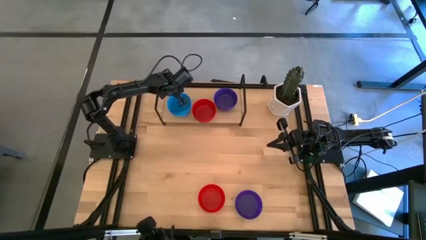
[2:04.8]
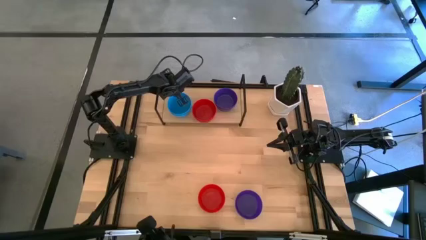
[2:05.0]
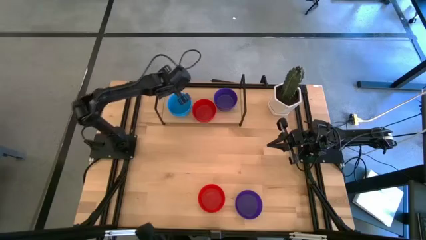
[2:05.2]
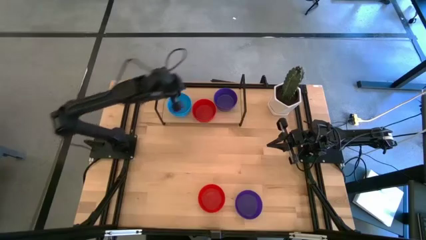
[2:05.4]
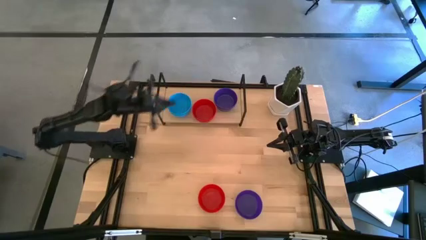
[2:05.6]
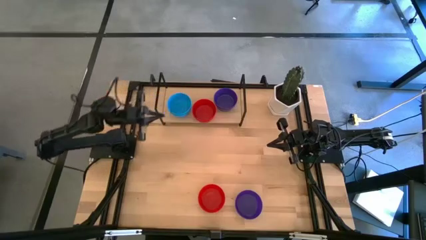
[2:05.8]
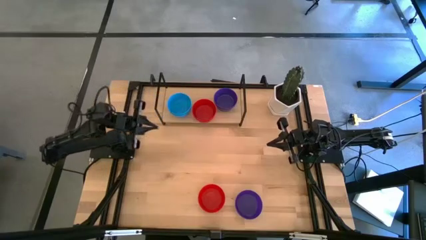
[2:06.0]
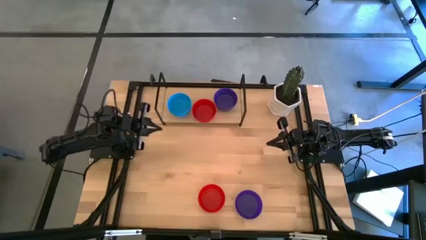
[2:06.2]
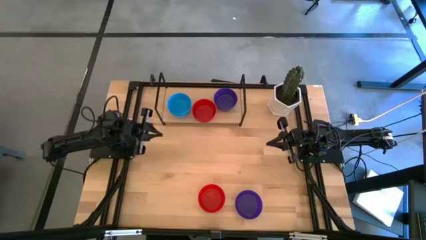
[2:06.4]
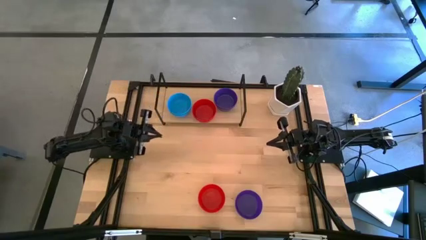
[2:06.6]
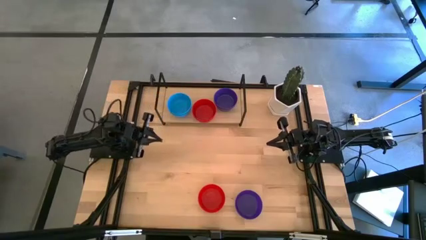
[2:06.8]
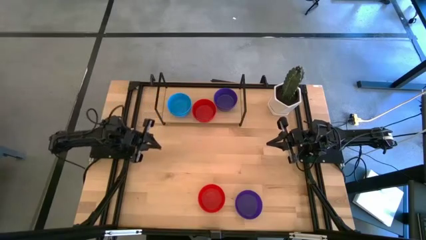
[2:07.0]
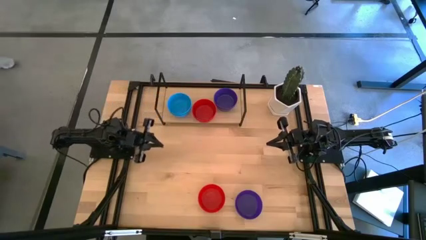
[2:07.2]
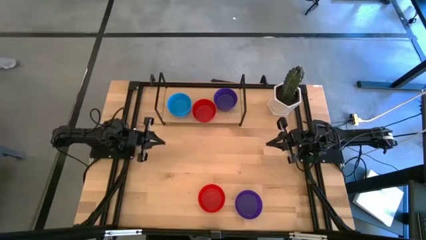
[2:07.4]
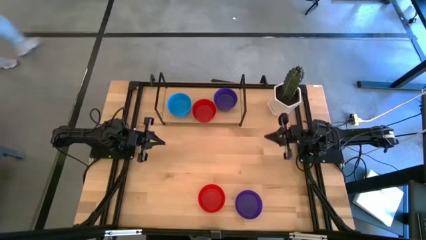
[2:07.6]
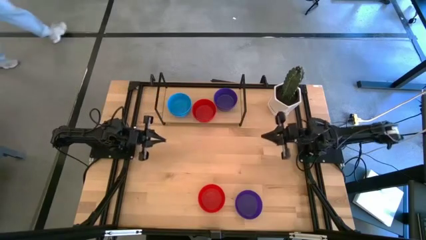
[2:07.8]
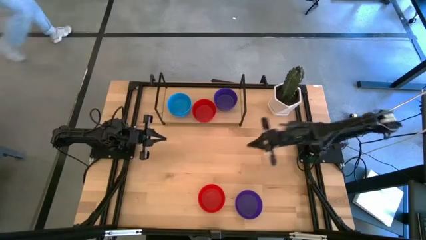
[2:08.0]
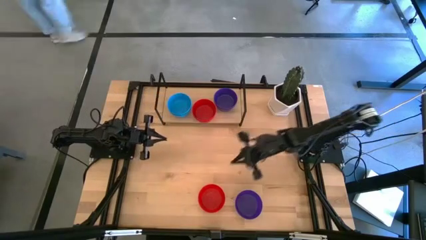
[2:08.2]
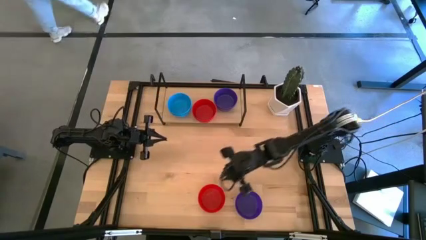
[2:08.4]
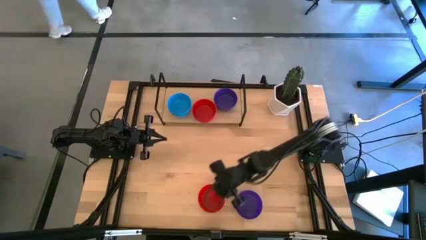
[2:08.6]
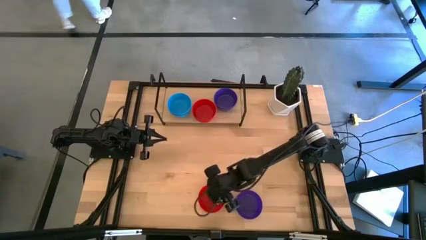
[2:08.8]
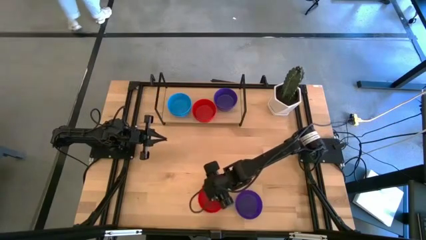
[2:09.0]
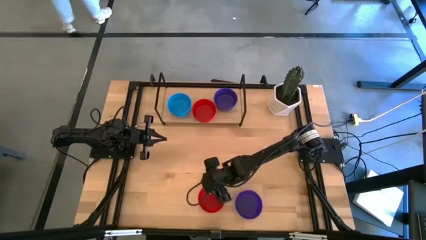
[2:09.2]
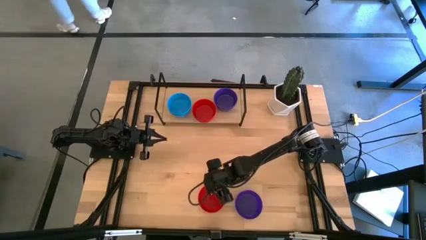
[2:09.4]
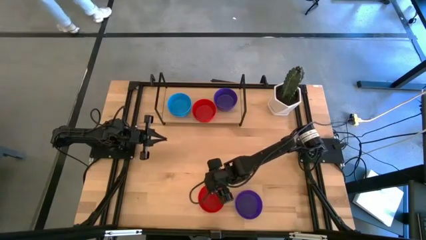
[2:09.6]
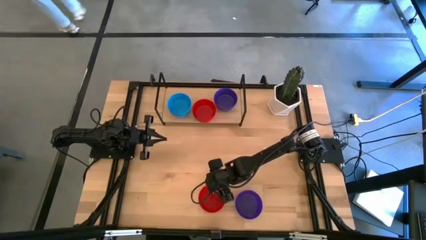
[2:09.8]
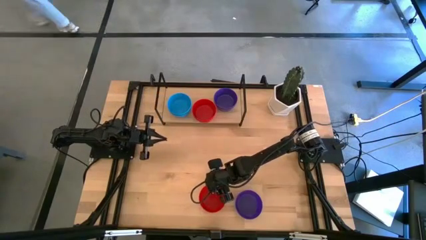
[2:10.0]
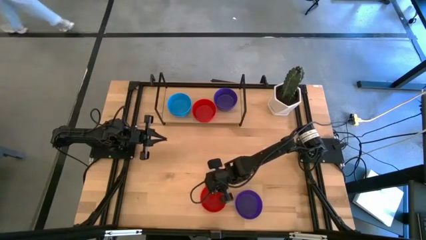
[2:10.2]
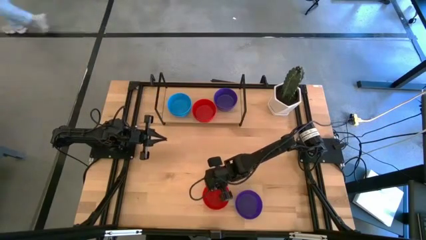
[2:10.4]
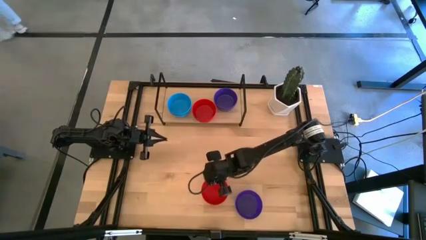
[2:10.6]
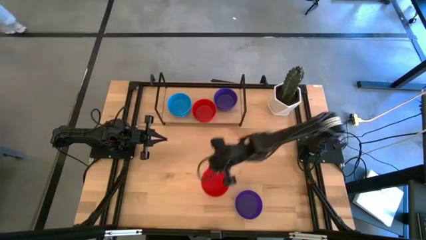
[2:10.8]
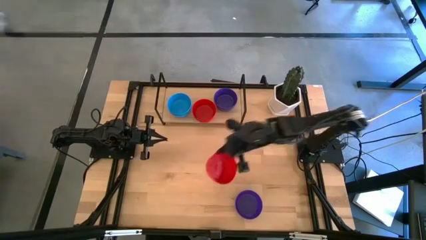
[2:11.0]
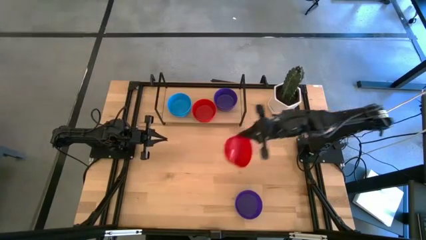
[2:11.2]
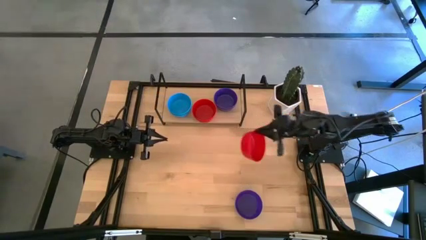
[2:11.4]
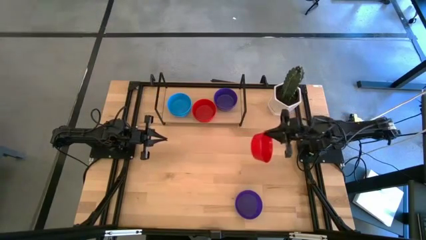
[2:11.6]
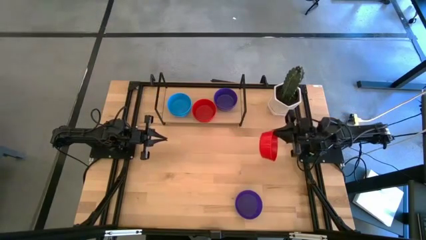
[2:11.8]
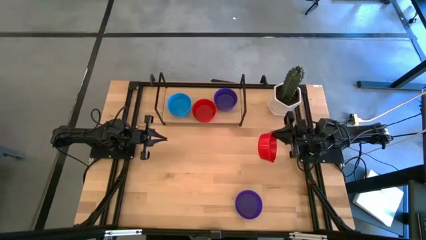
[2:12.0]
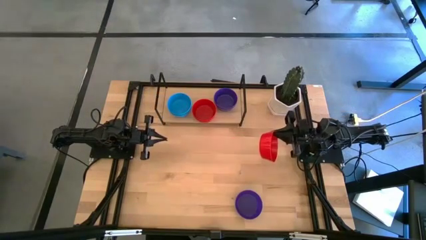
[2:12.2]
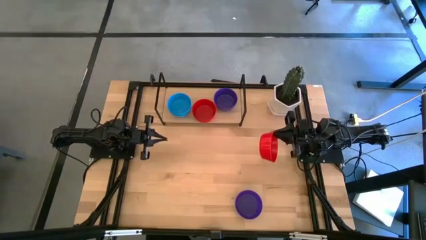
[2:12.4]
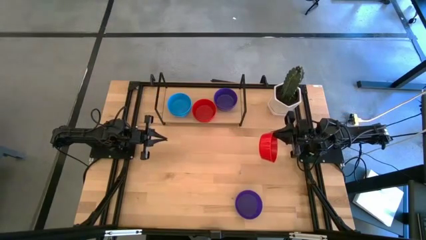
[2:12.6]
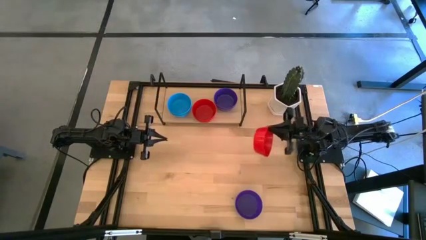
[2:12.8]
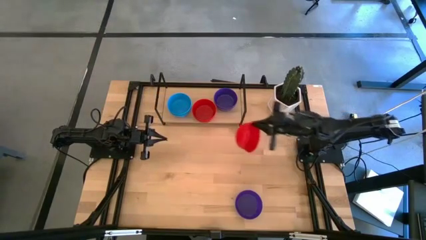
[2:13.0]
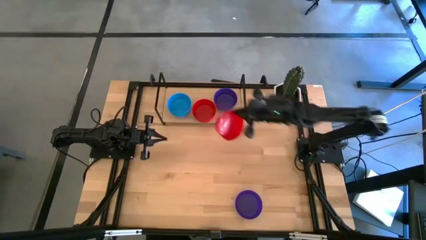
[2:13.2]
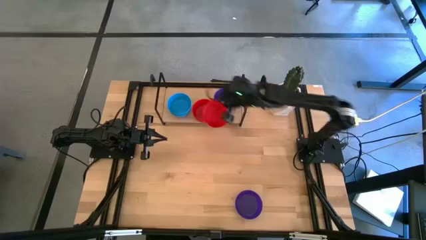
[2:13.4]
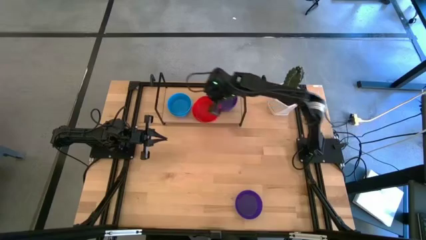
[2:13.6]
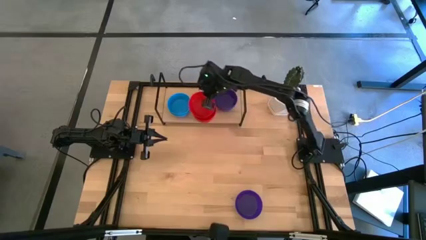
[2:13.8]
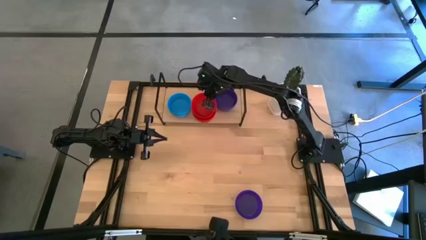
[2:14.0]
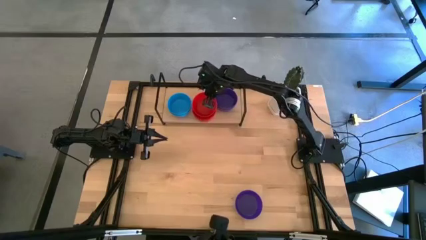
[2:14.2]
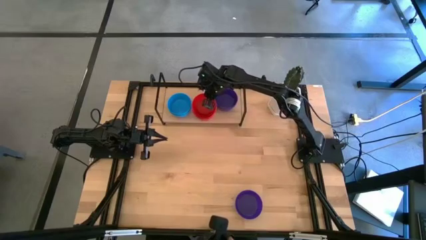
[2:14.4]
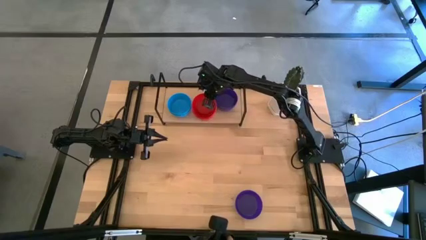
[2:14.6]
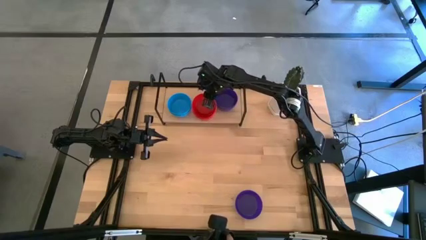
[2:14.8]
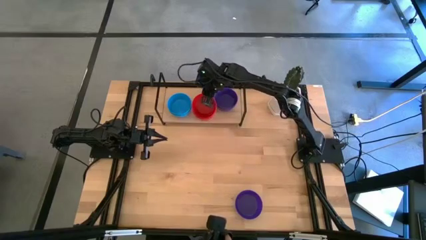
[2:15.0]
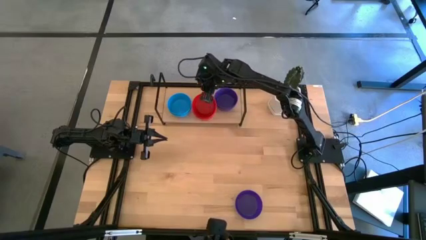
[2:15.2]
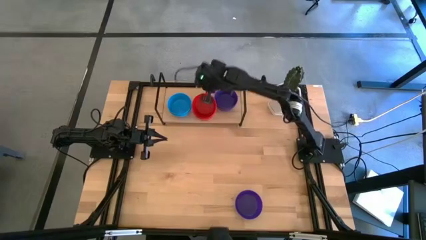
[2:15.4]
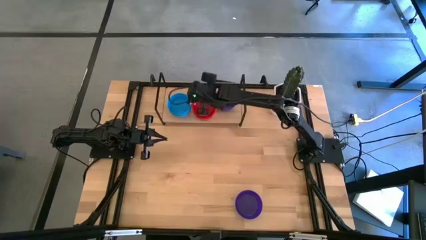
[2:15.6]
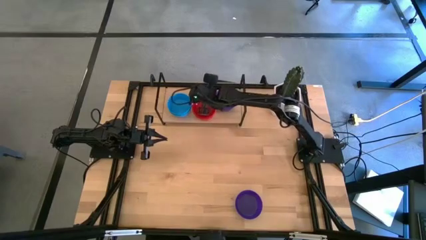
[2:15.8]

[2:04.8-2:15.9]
Task: Pick & Place Mini bowls
Stack the red bowl on top of the red bowls on the shelf

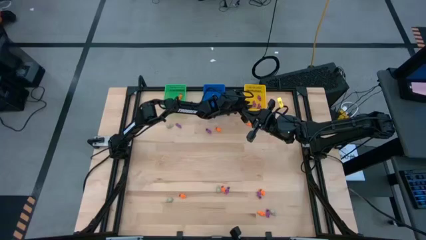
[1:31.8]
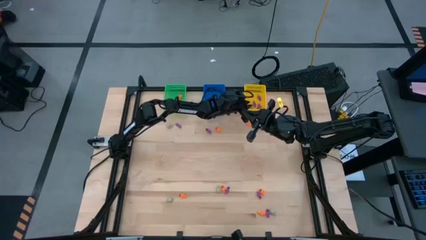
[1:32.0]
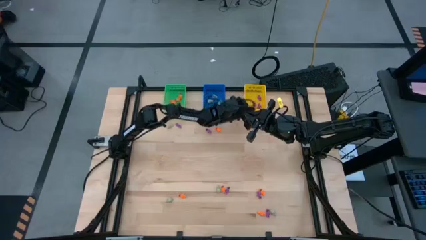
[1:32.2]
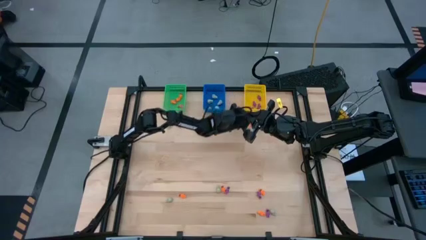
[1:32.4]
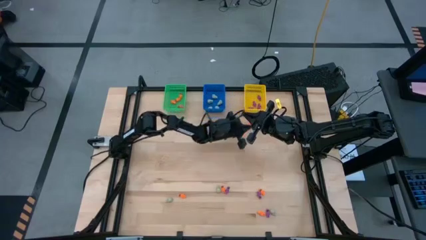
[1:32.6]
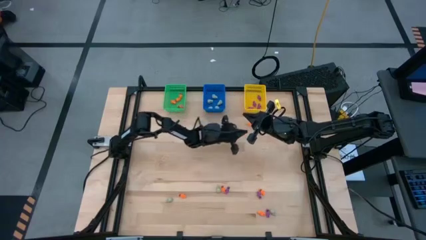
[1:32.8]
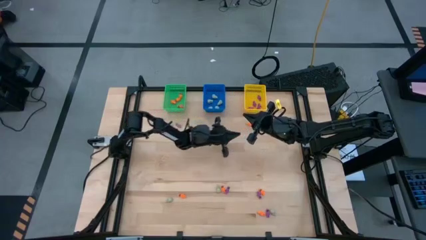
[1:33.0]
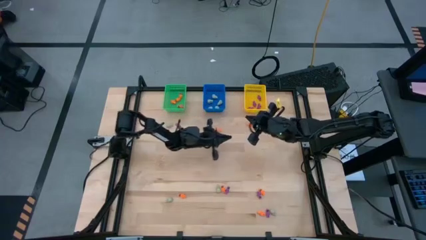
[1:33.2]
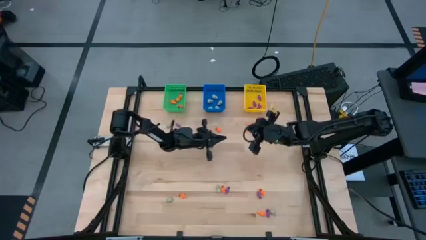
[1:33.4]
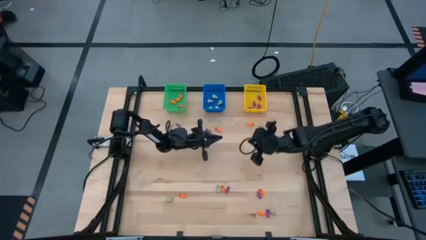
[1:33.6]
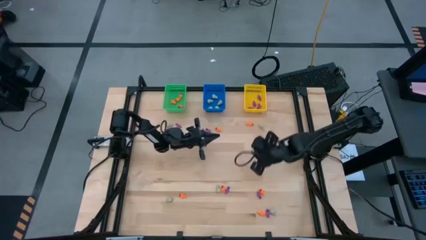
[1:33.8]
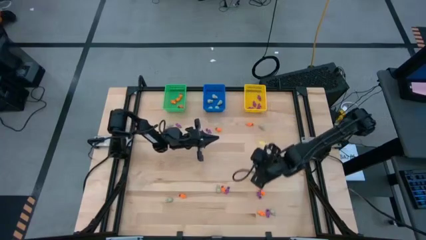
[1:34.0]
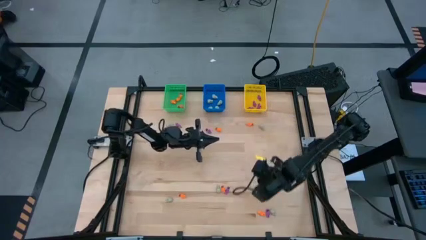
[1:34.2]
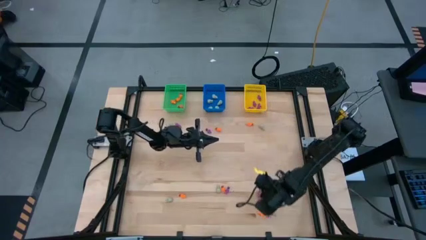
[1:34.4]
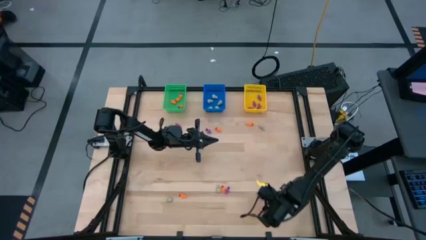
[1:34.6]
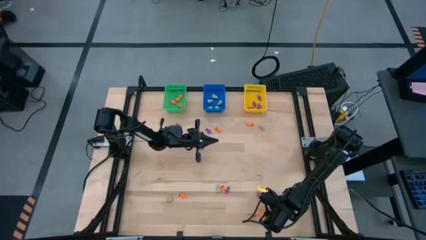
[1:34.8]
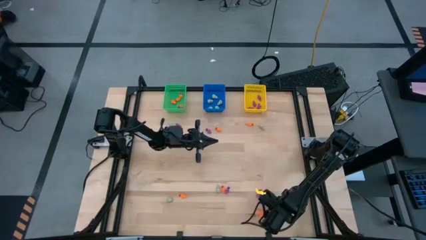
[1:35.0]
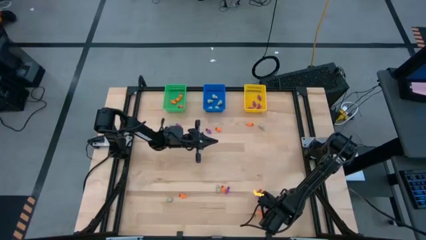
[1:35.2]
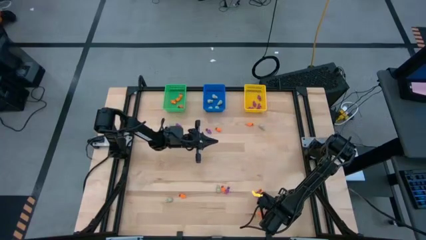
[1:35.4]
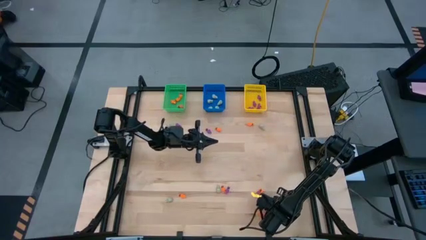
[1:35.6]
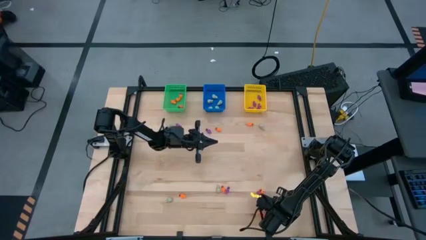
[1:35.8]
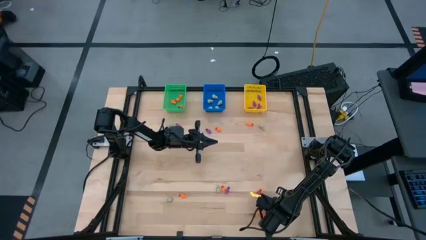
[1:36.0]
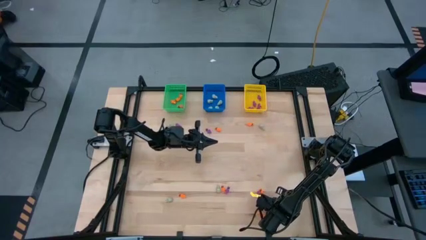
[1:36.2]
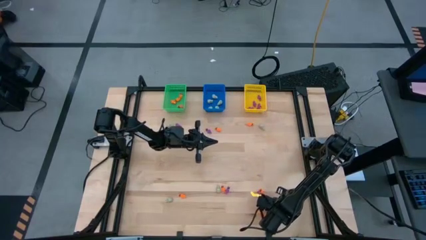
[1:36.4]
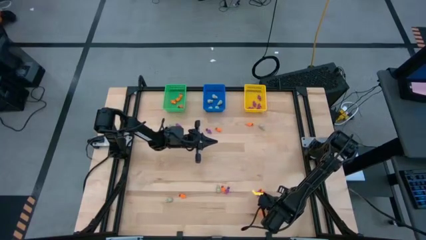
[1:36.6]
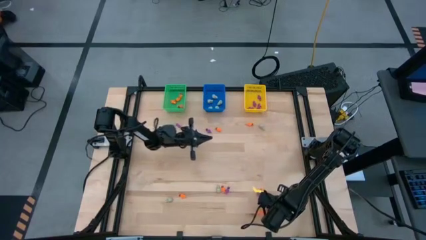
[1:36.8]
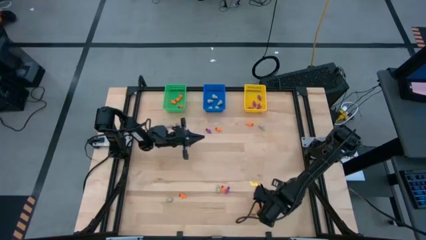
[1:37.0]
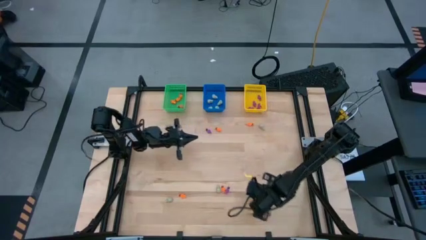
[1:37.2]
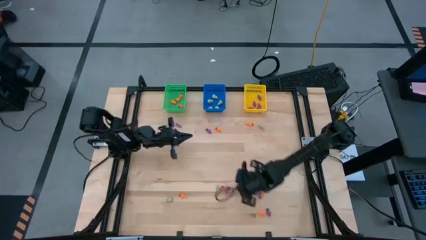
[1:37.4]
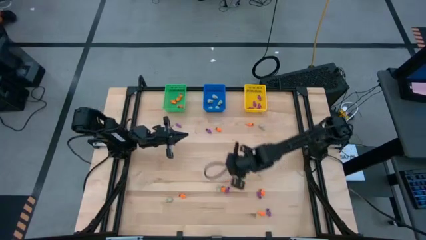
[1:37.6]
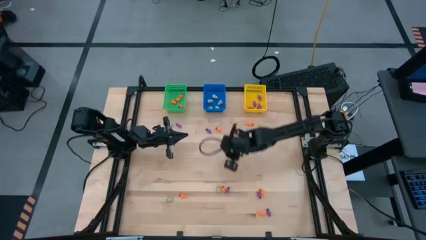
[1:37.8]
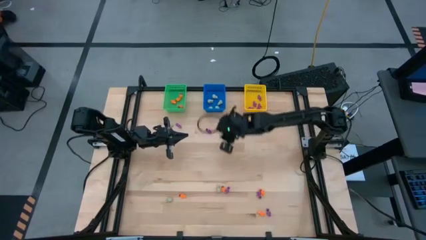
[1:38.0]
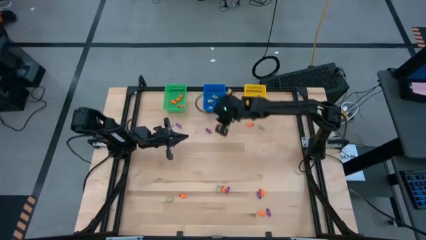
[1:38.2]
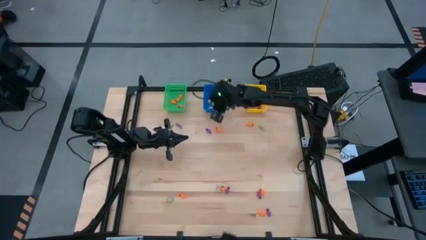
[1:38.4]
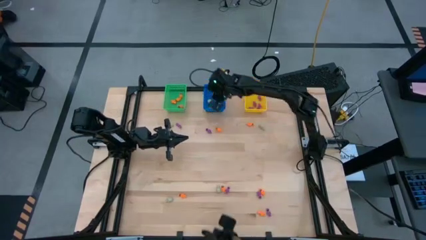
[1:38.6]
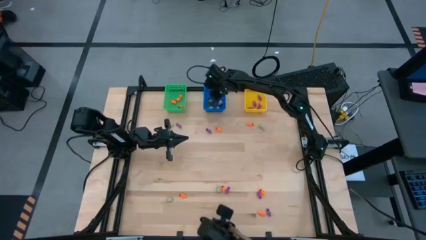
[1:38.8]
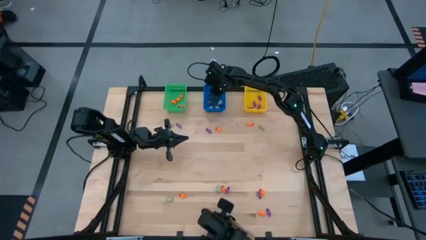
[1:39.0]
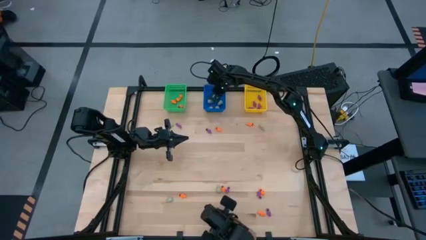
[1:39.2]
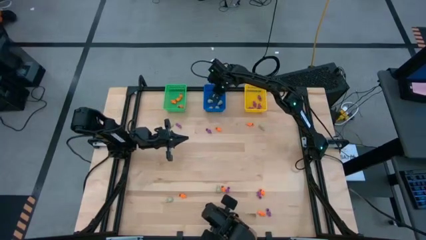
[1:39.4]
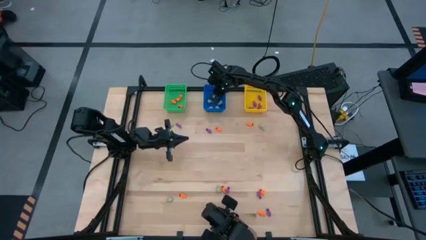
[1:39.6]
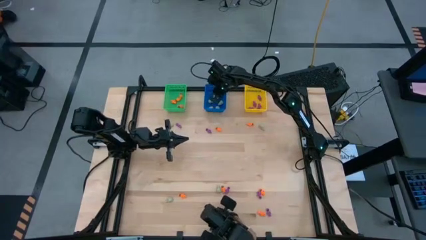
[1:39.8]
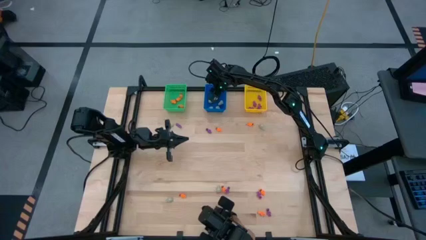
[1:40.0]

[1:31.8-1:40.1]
Task: Sort Halloween decoration
Put the white skull toy into the blue bin
